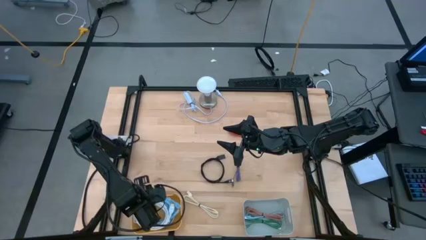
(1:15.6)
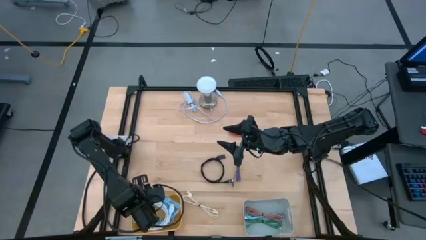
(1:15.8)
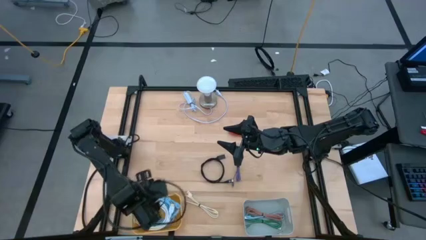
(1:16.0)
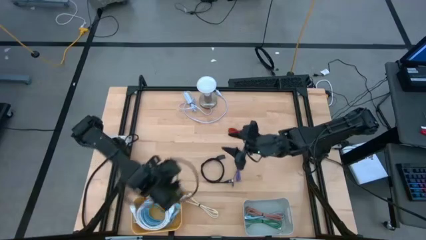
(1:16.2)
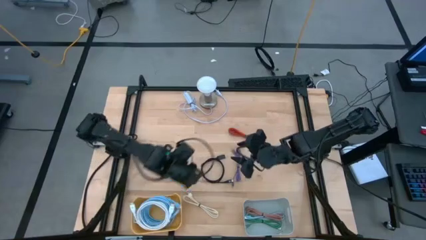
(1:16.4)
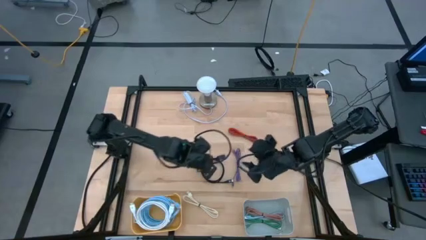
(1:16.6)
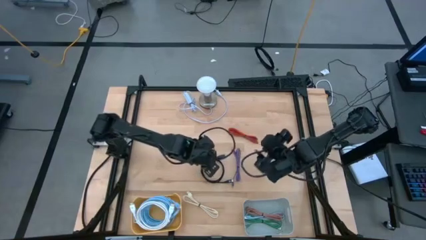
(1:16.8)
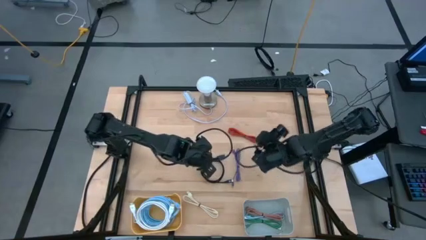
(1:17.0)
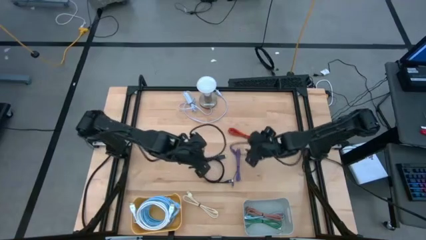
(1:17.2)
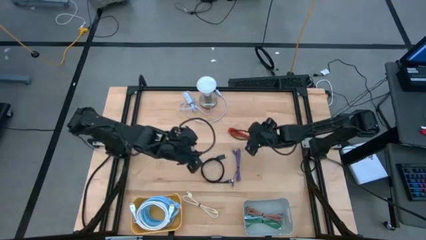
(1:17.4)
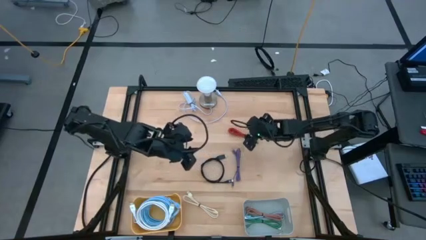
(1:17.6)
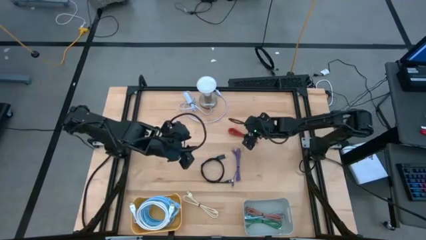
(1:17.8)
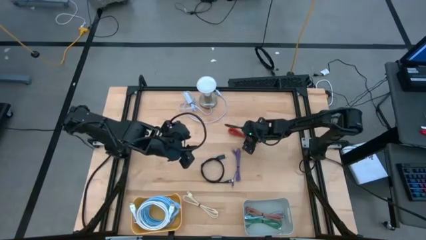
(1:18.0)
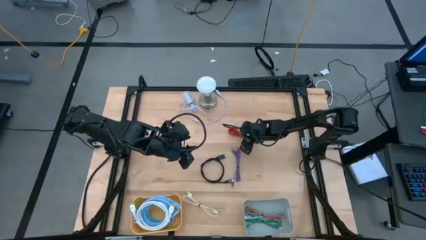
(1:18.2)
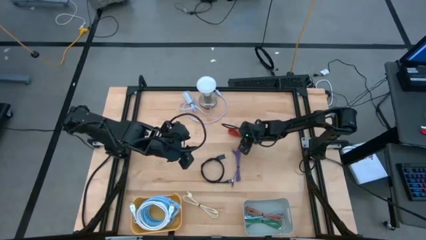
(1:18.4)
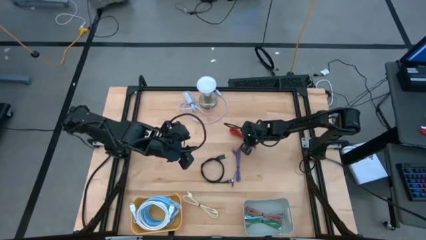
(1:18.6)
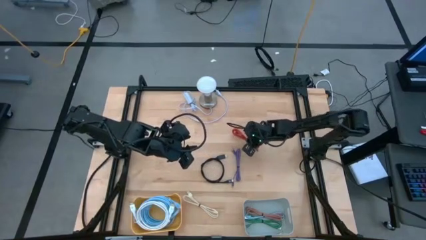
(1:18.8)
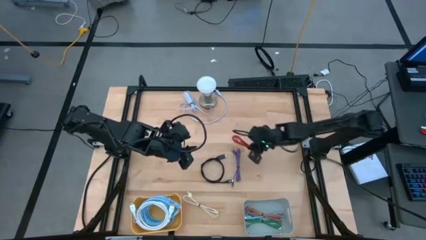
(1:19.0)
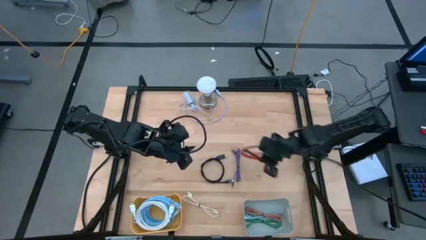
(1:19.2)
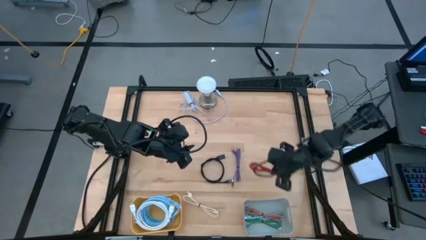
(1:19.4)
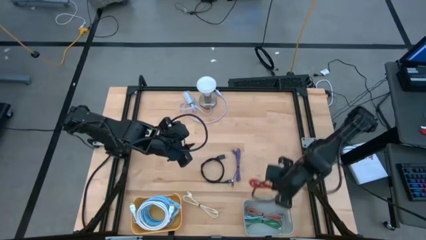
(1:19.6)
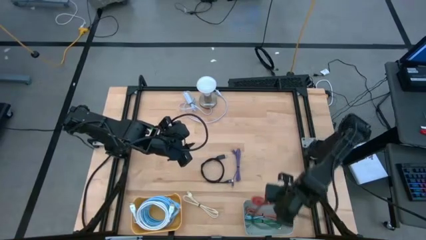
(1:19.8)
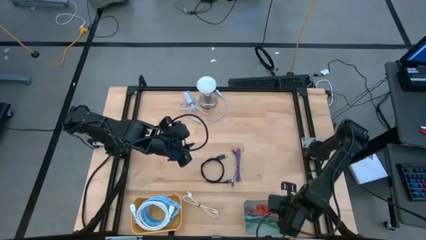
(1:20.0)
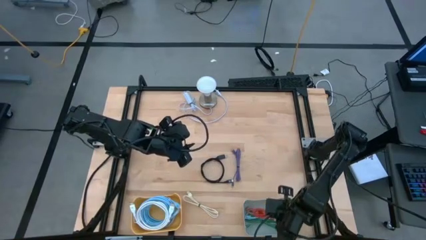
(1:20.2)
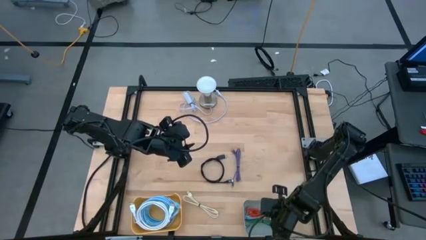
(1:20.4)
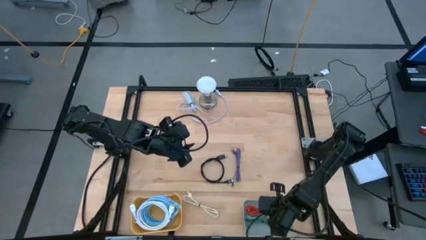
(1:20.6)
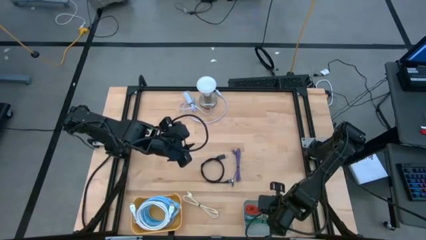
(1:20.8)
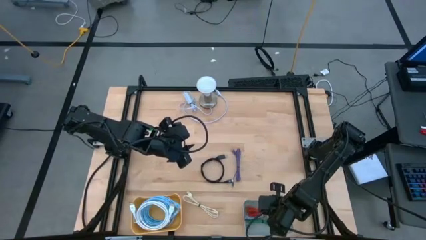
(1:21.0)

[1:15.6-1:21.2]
Task: Pick & Place USB Port
Put the red charger cable into the gray bin

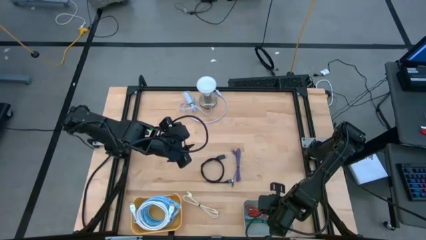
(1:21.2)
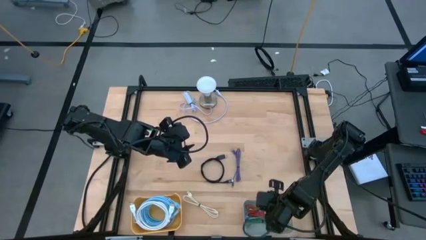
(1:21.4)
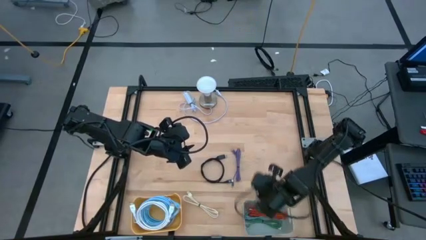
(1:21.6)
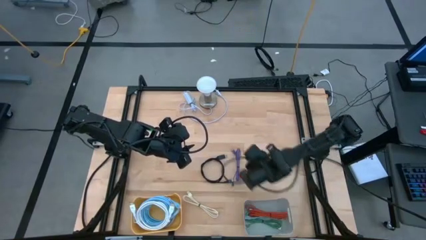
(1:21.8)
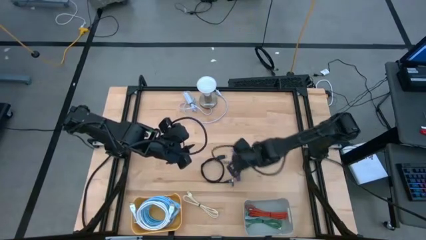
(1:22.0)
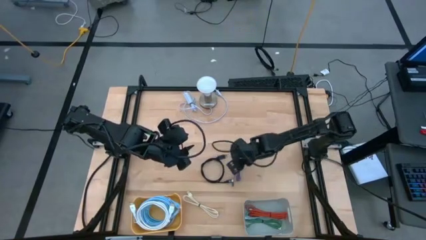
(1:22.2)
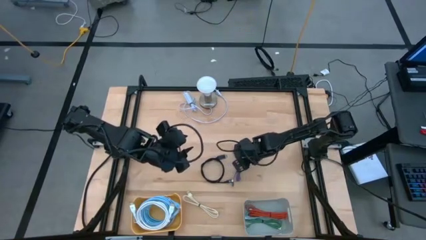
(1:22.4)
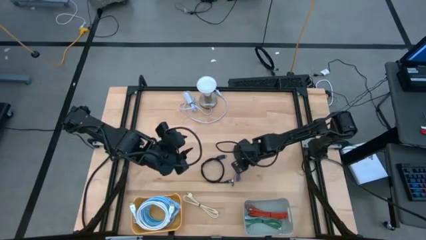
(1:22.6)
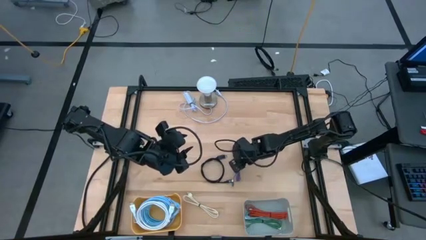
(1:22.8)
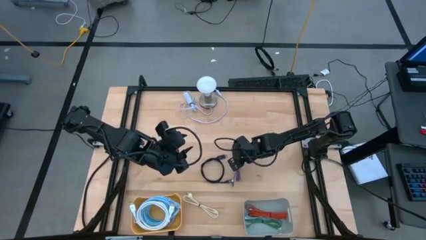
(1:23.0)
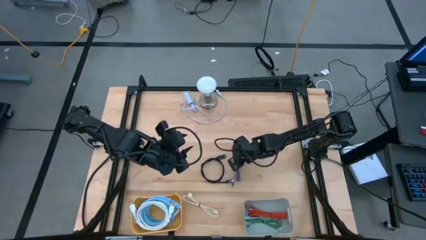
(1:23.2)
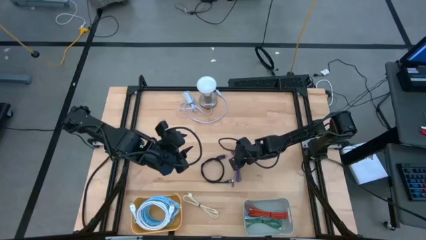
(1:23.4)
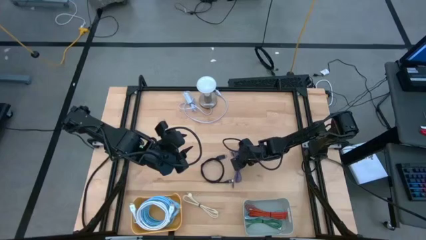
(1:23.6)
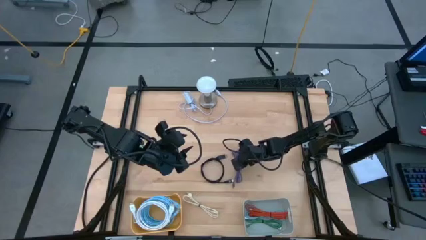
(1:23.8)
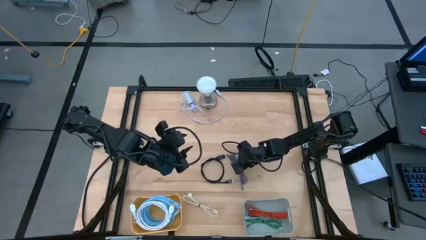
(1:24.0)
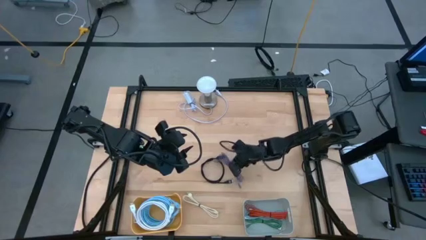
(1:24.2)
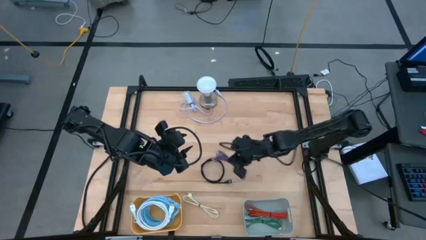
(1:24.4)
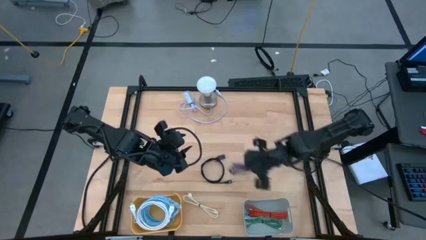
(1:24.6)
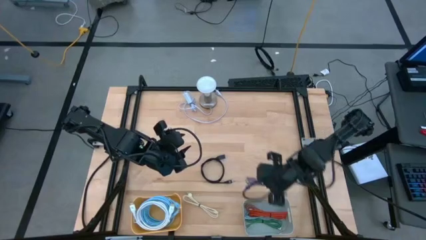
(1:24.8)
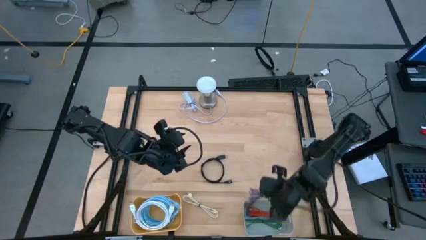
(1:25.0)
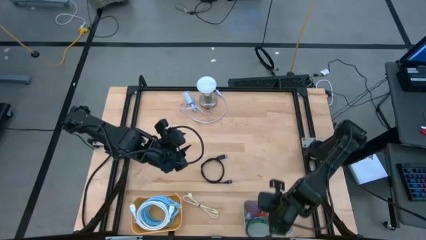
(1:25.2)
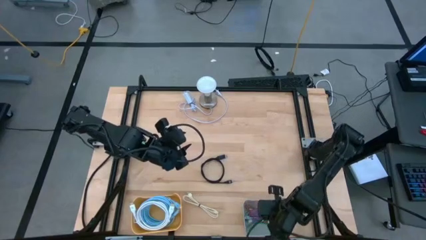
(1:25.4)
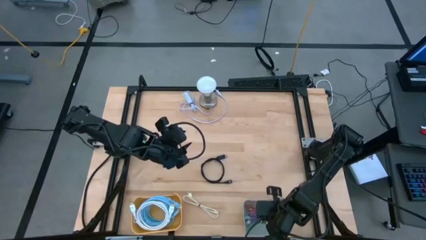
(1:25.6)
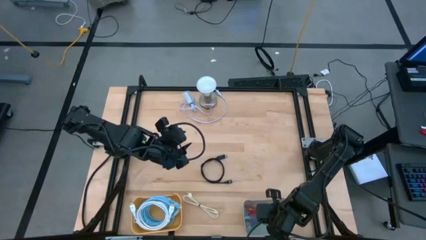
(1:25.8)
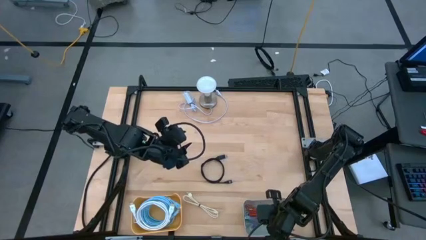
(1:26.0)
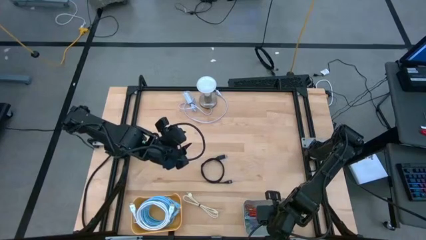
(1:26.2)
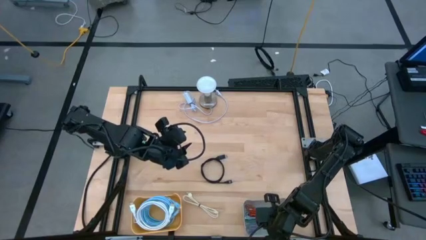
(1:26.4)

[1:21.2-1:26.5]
Put the purple charger cable into the gray bin

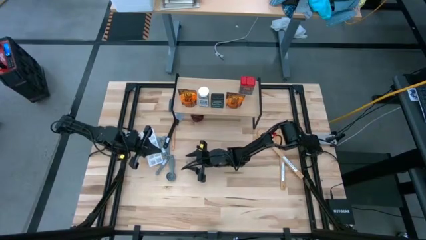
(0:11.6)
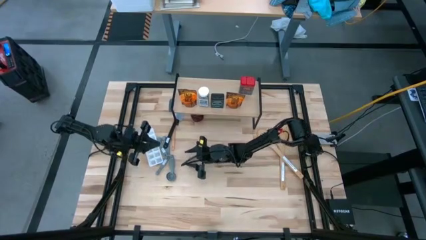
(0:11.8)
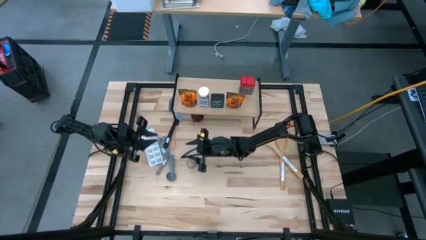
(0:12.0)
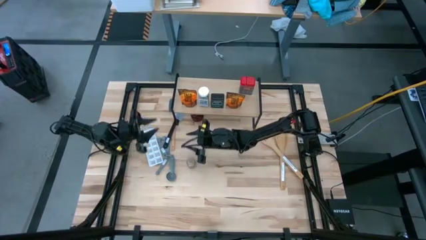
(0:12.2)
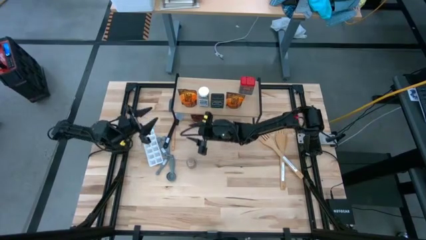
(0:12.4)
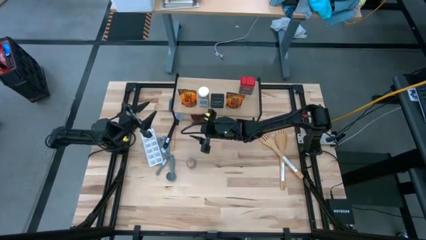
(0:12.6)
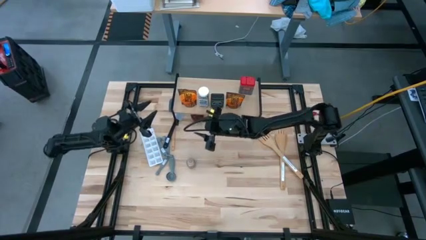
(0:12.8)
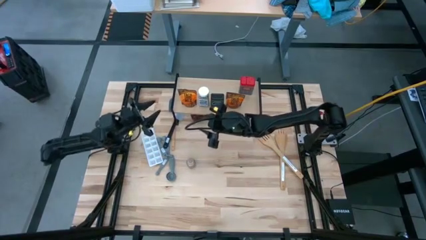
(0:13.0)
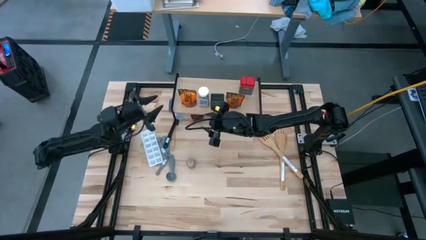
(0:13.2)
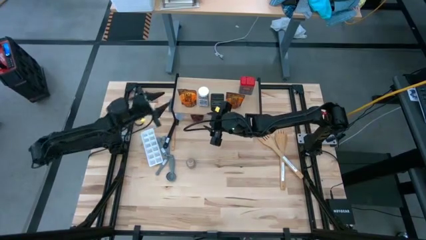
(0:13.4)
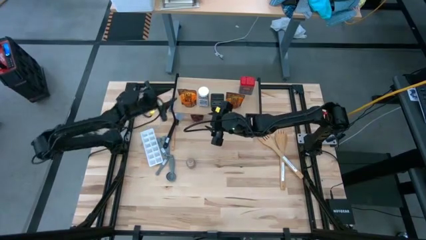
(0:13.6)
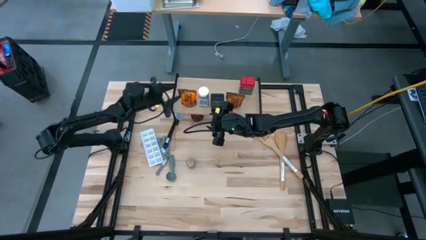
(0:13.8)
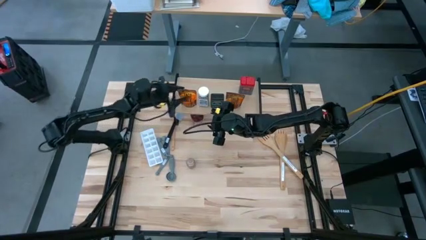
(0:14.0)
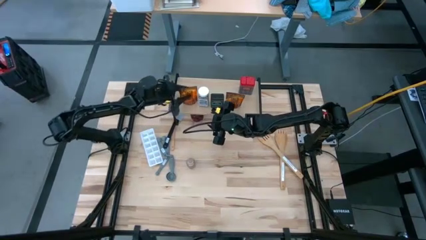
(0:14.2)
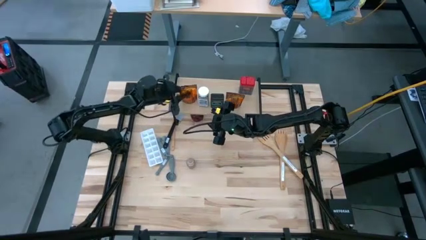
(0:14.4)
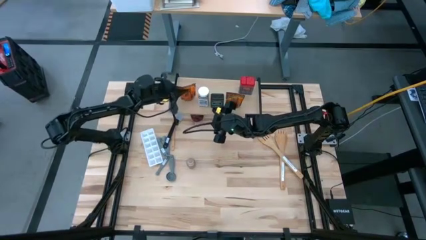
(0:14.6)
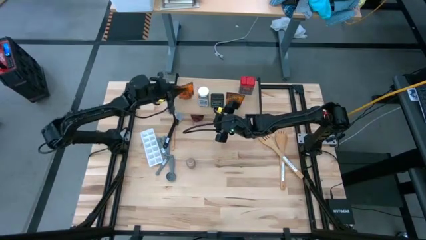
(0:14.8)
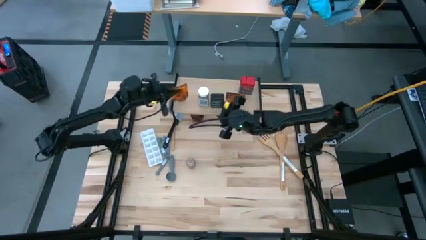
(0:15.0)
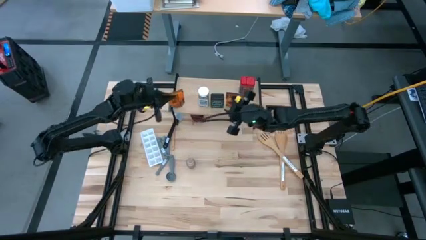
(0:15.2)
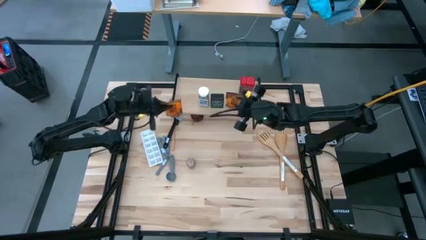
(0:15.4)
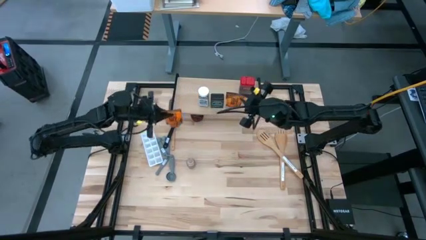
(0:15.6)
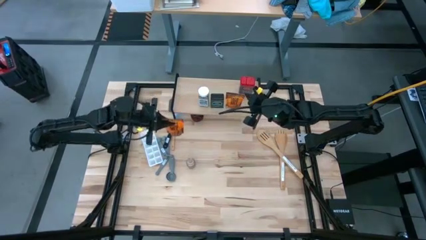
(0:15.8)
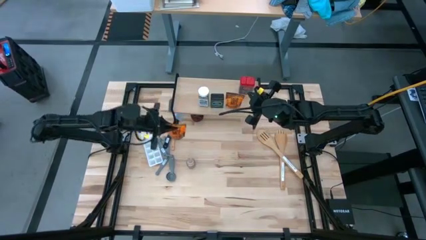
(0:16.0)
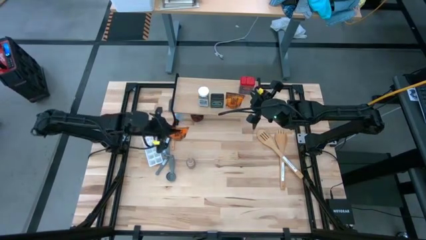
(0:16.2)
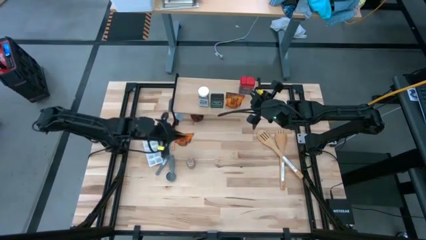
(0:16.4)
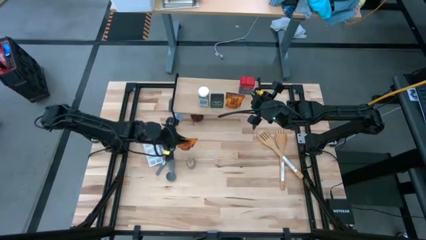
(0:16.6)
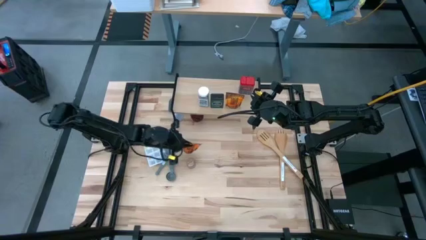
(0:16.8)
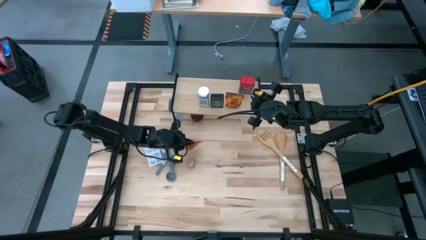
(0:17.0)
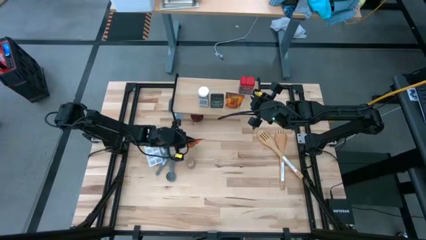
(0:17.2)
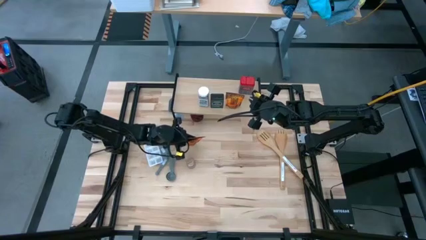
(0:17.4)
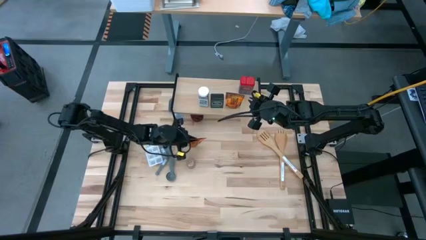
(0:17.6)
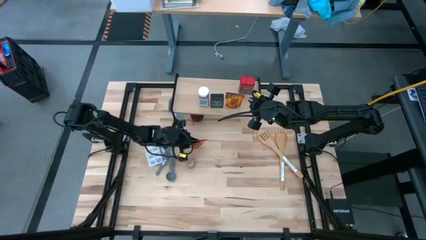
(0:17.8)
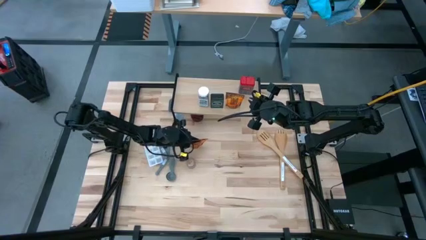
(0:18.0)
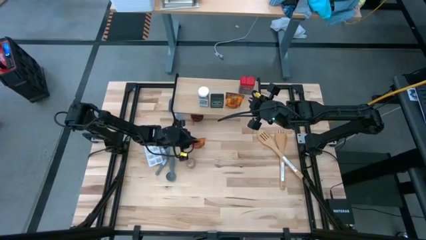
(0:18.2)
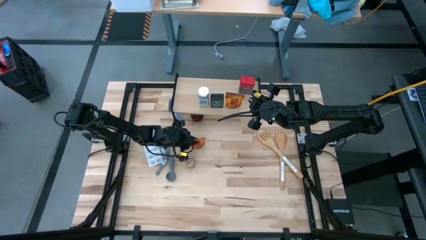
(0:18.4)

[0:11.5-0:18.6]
Task: Shelf spices
Remove the left orange seasoning pack from the shelf
